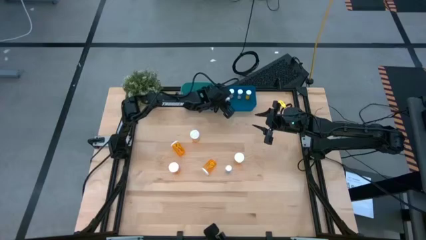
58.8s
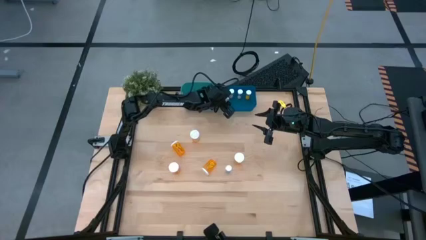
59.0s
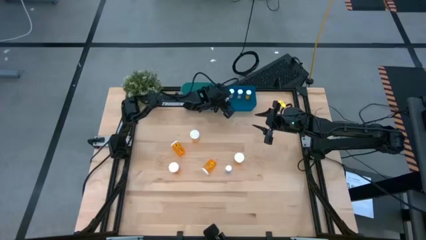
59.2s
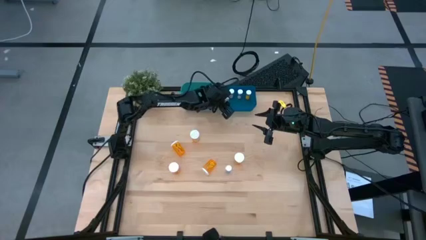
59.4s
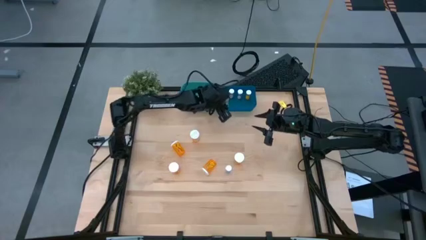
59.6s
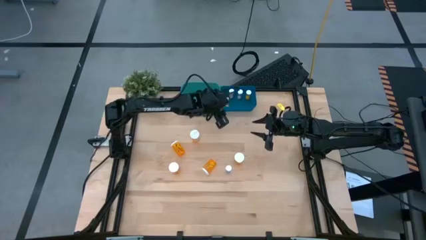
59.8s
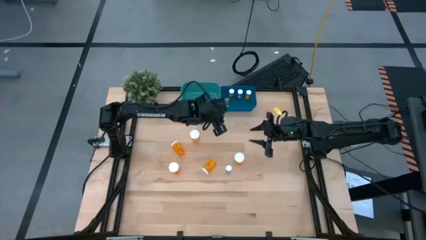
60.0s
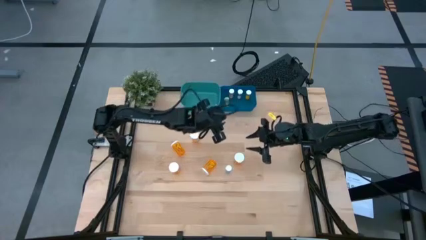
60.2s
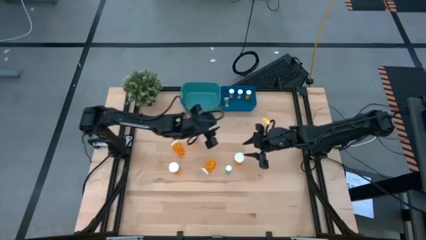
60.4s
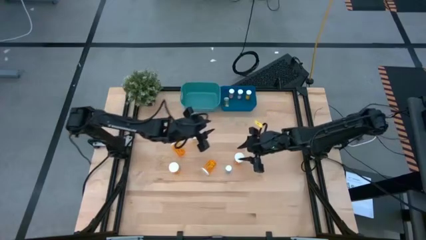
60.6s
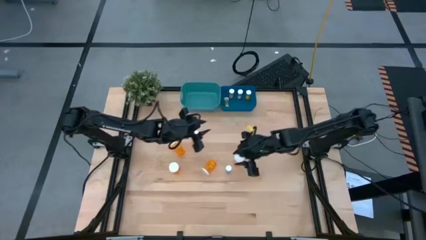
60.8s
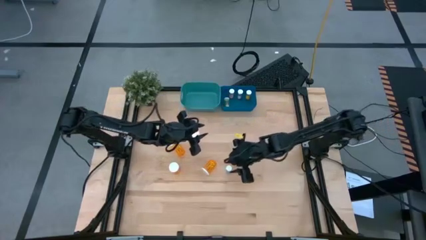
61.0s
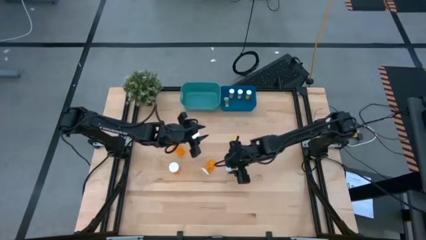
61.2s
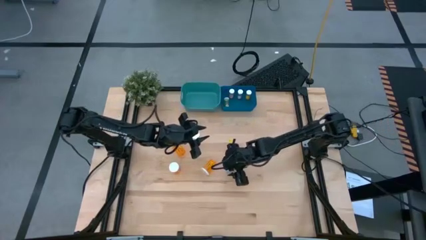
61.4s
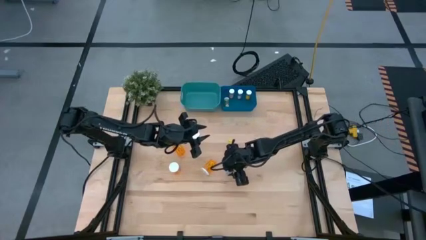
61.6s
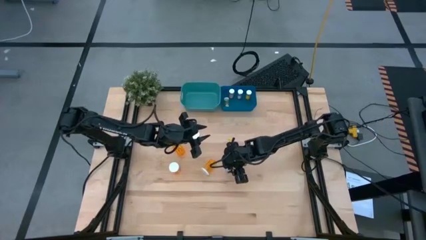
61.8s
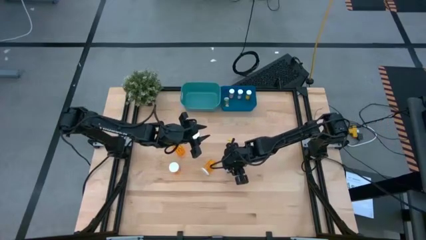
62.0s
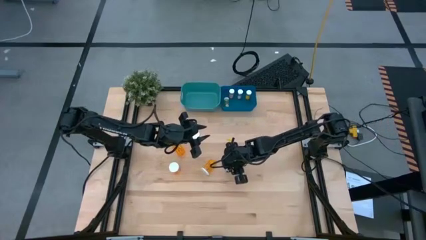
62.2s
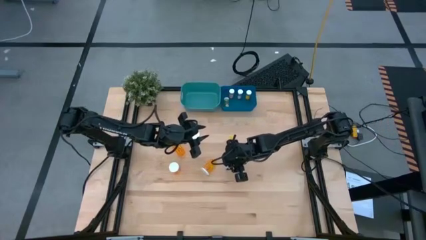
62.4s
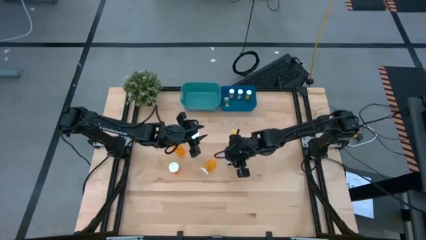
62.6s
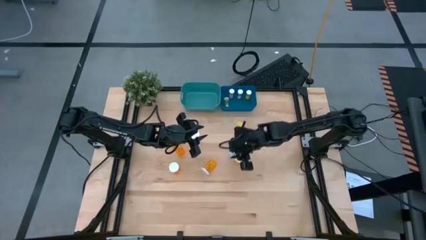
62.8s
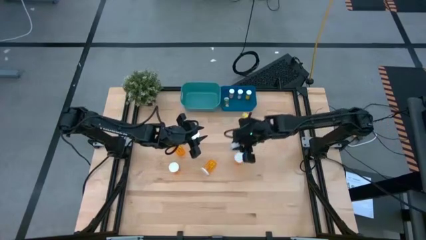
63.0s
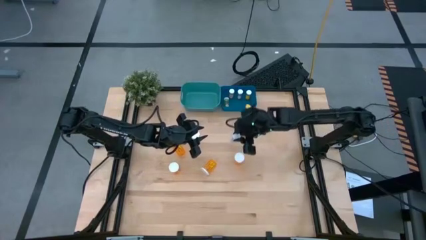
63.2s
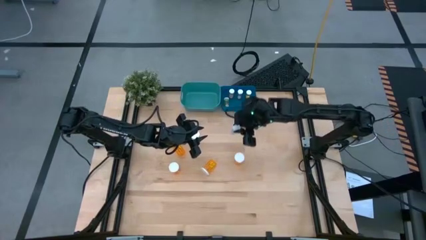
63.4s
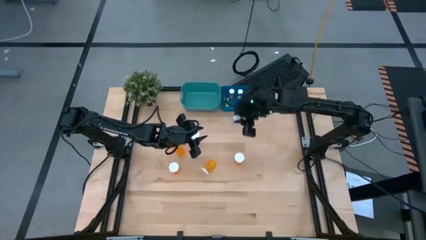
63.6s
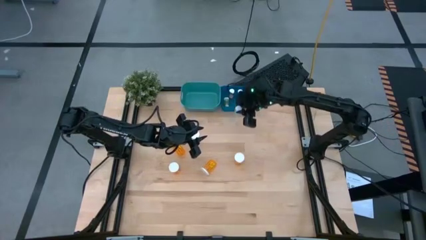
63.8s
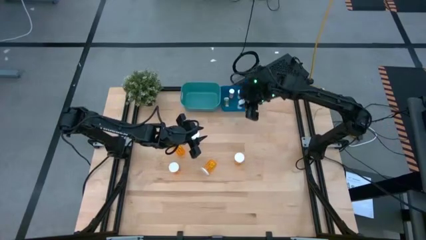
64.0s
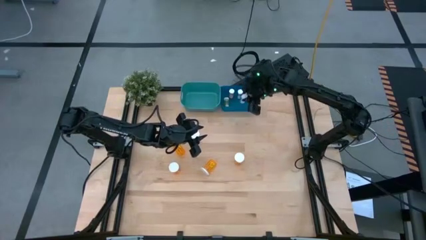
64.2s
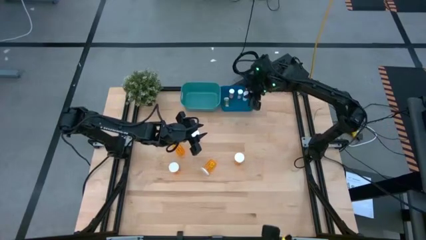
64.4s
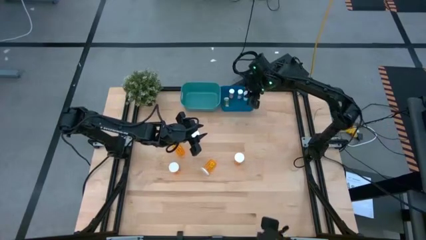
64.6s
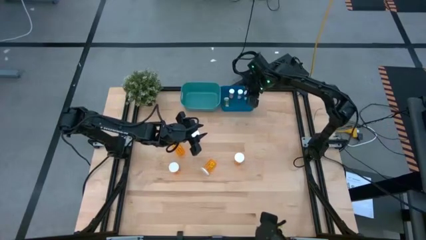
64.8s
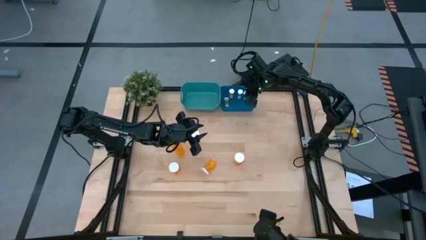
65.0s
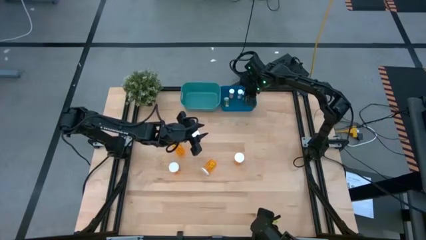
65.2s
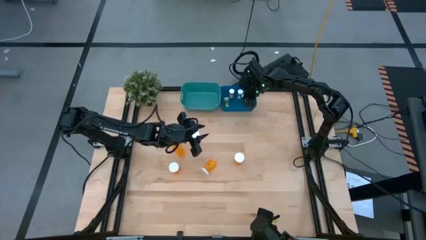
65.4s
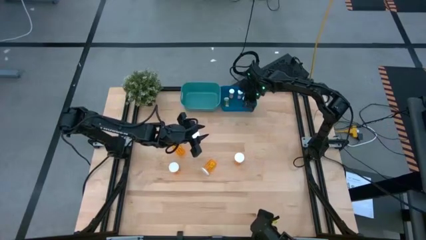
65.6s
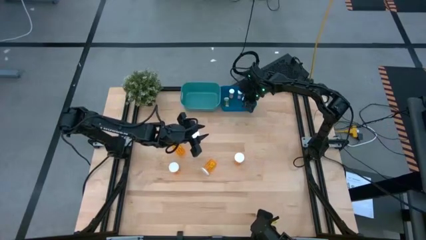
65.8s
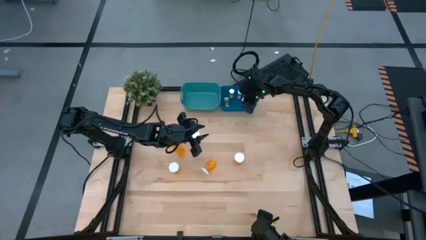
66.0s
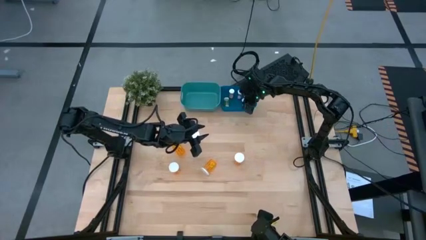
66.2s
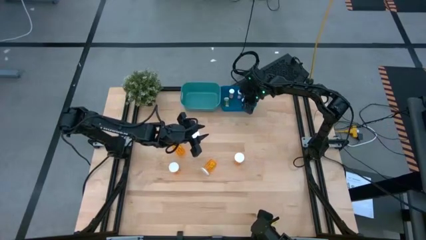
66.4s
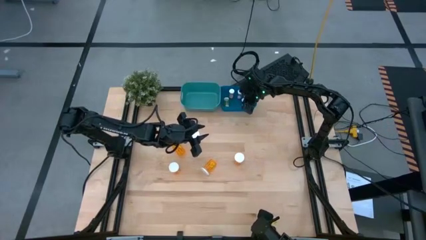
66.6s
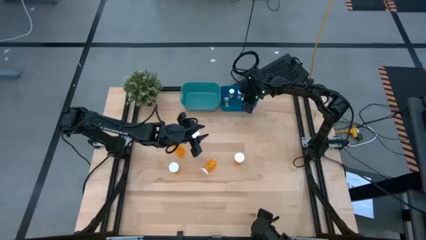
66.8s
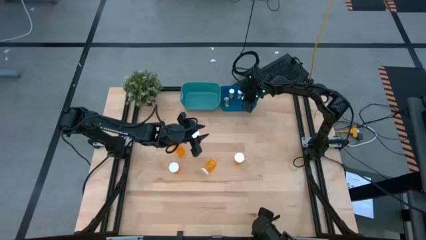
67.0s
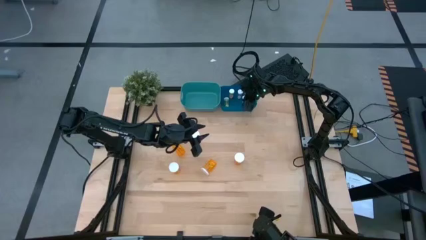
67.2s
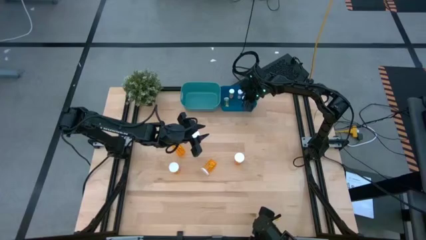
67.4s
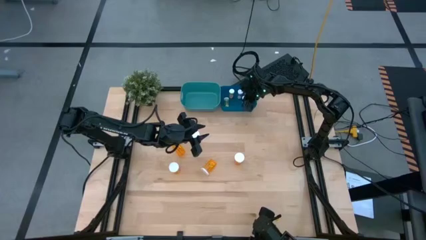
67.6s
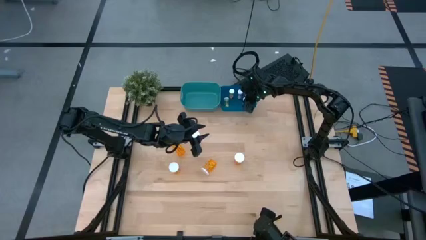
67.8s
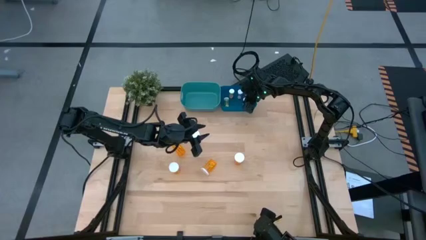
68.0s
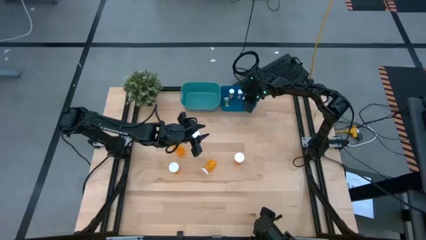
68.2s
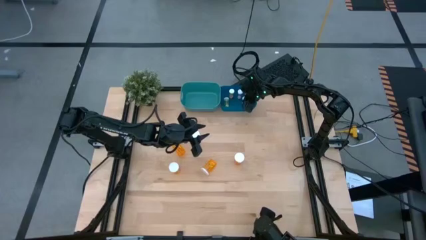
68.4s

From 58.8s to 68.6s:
Task: Pick and place medicine bottles into bin by pill shape (circle, oval)
Put the small blue tablet bottle into the blue bin

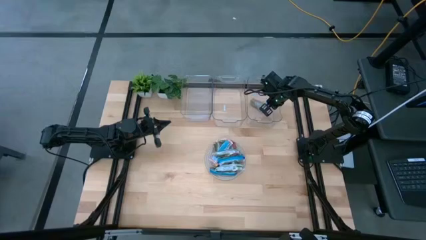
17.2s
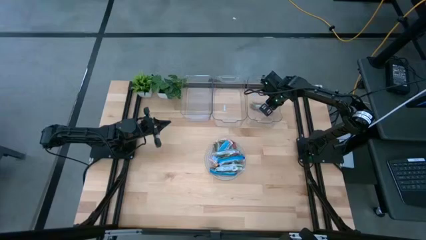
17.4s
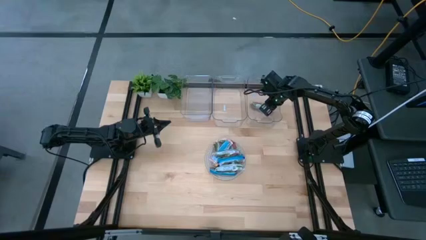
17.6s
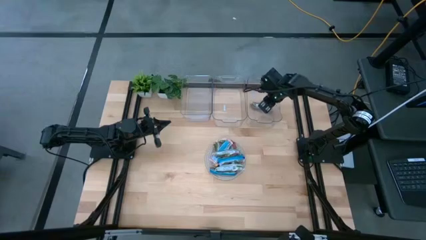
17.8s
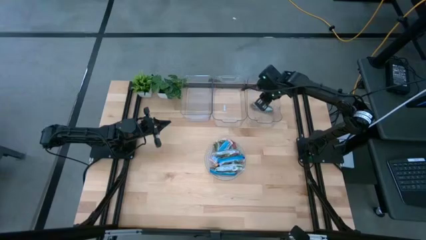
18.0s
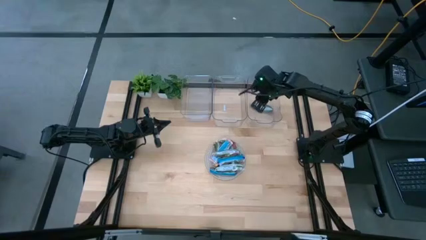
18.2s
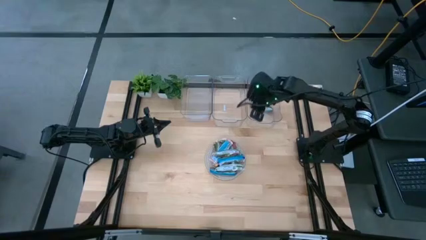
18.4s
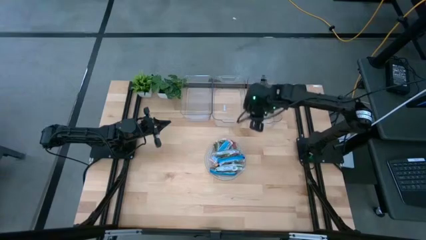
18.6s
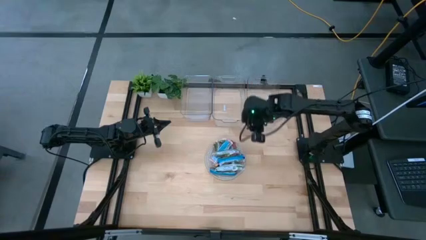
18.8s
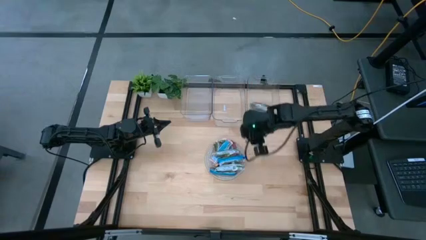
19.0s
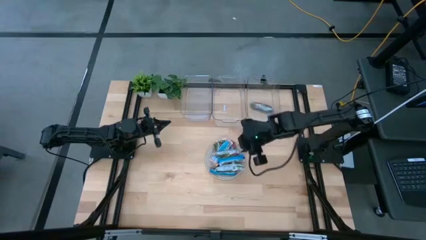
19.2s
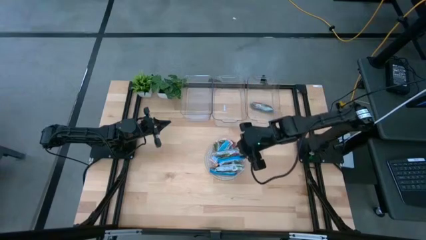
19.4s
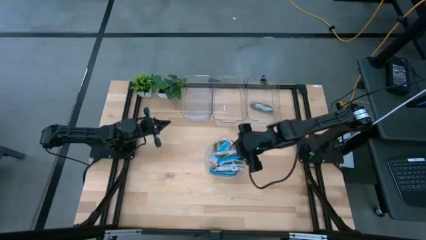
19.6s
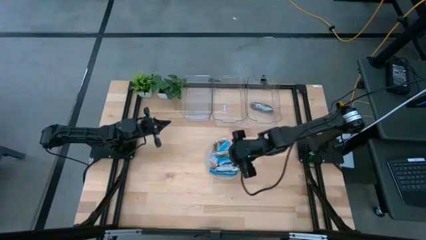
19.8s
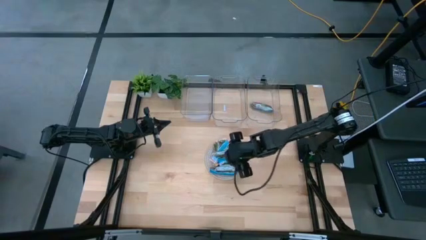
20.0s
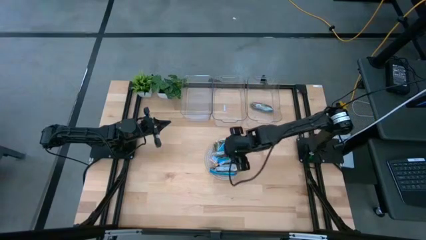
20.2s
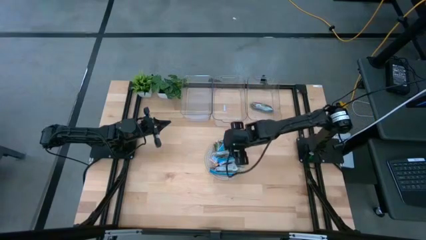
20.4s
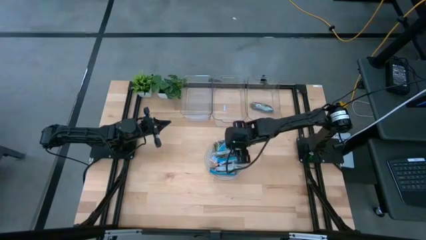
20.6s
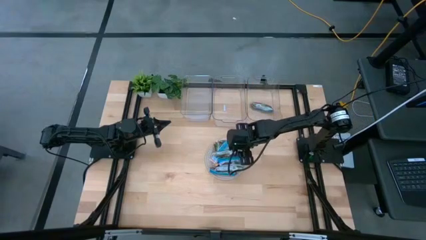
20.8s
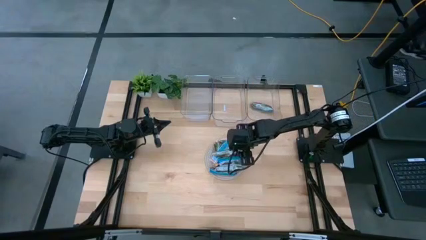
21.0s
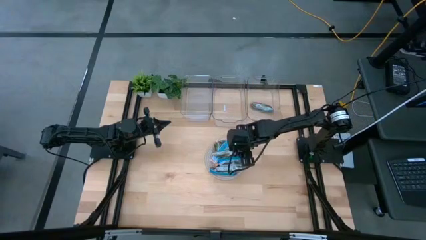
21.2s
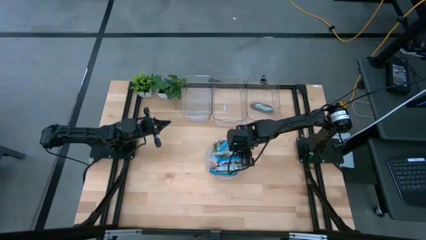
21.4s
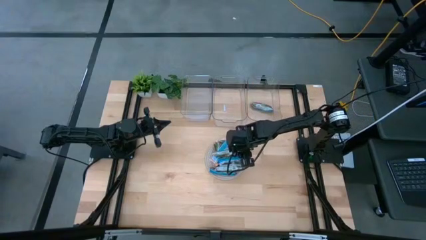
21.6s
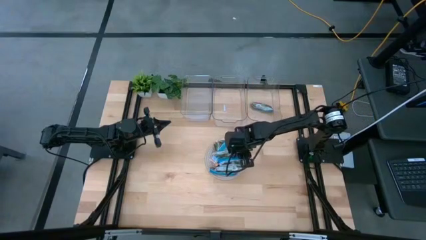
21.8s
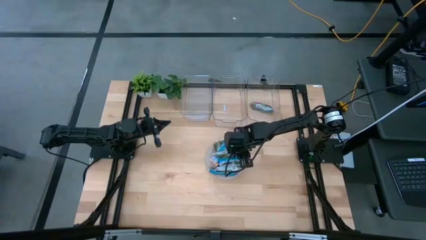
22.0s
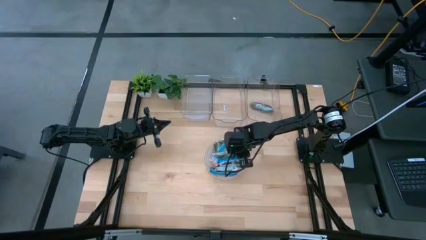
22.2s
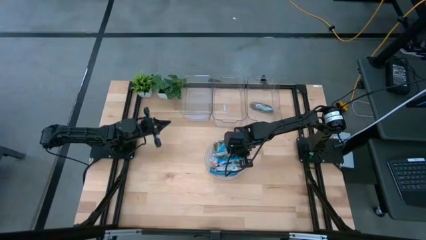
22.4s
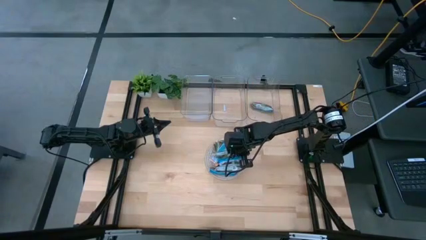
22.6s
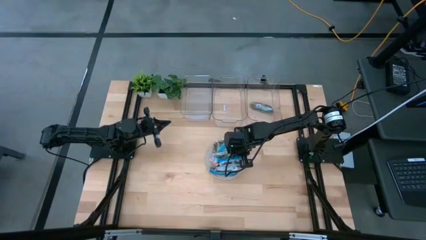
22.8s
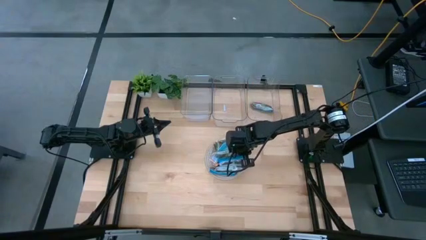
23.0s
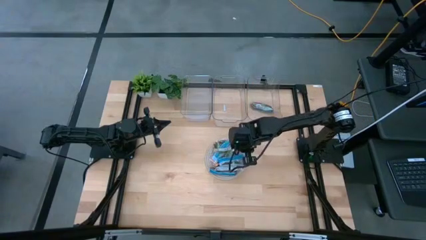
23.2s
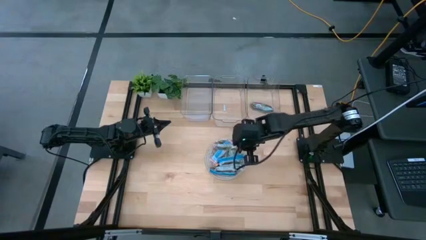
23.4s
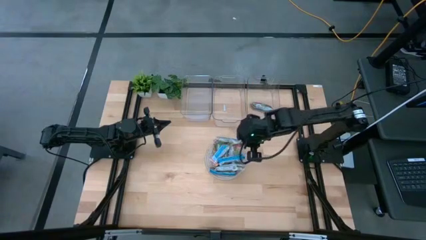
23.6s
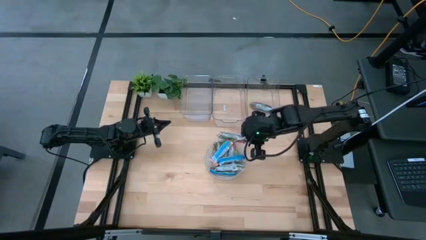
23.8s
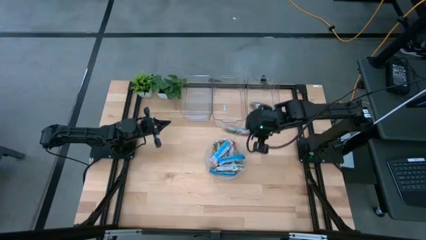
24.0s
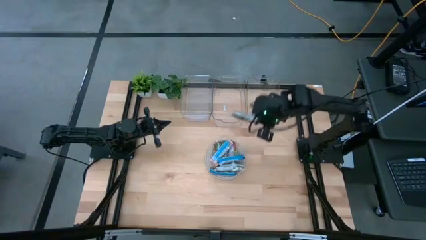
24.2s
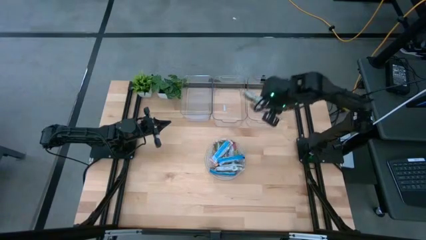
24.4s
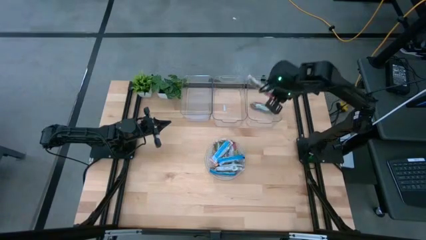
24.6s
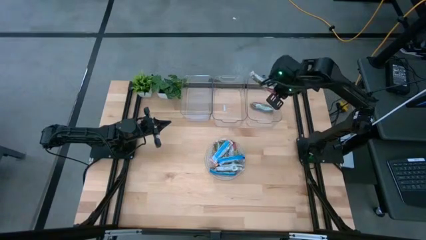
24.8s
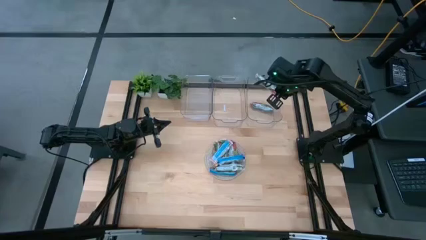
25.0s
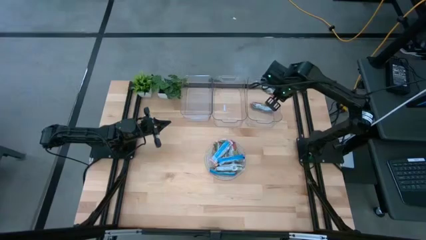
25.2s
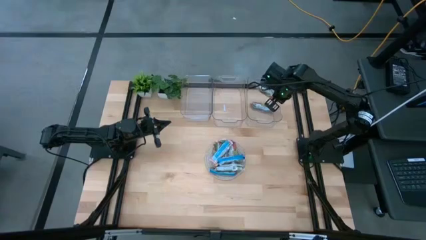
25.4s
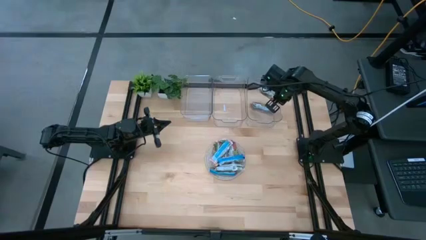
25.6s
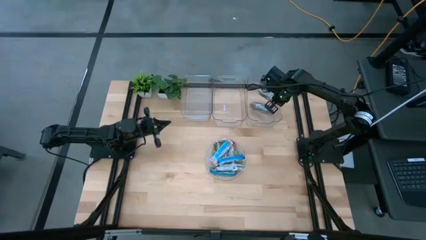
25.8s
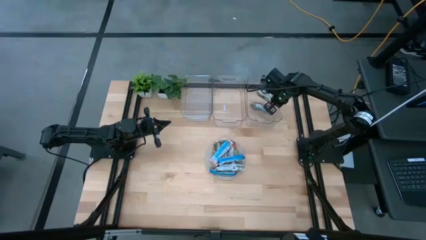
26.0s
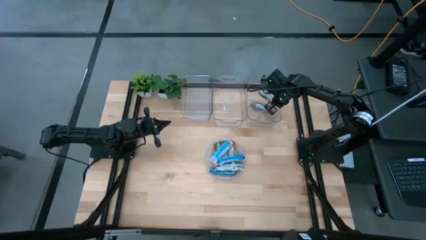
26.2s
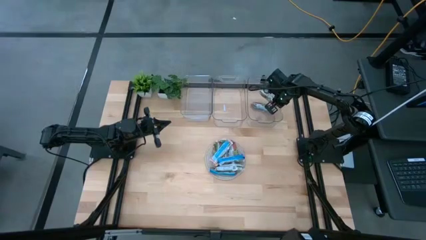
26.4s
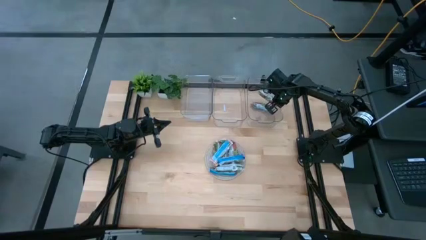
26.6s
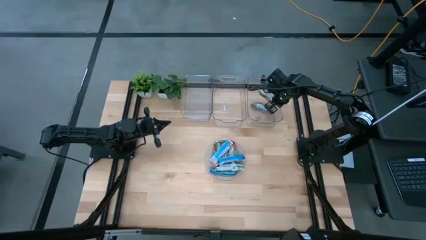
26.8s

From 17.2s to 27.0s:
Task: Pick and place Granola Bars by type
Put the red granola bar into the right transparent bin
